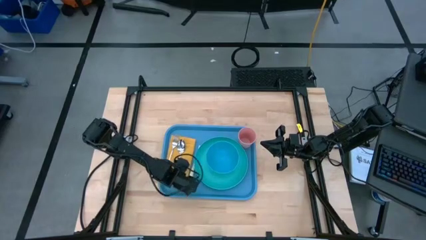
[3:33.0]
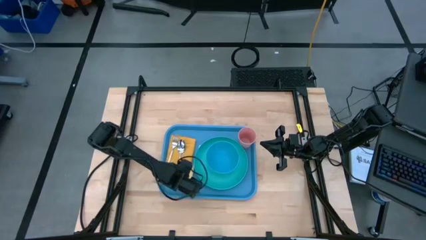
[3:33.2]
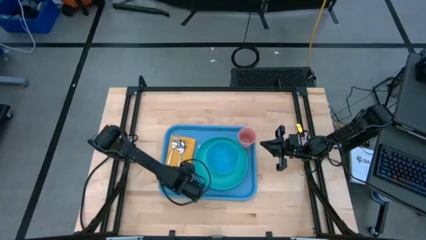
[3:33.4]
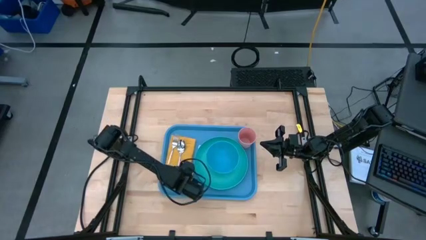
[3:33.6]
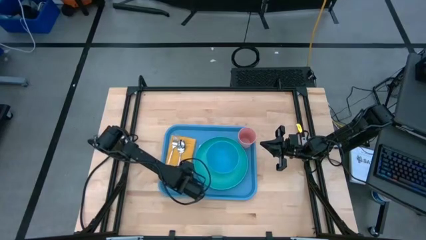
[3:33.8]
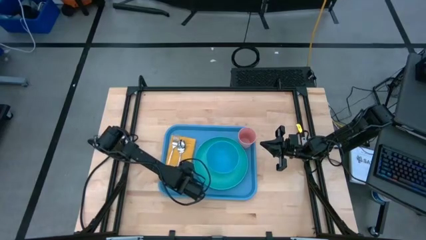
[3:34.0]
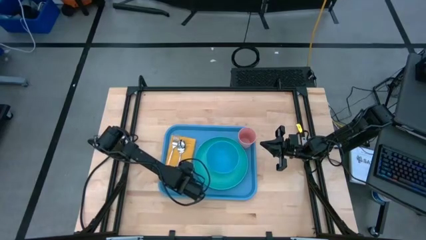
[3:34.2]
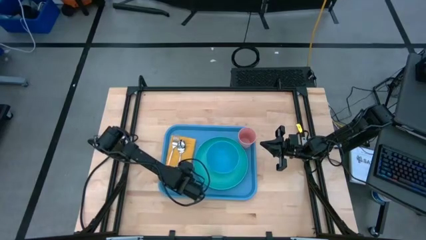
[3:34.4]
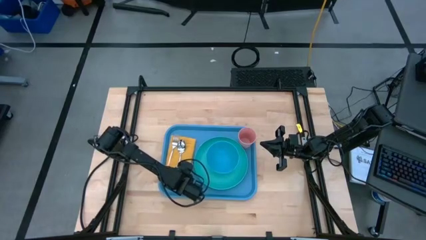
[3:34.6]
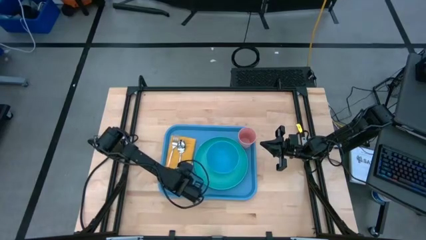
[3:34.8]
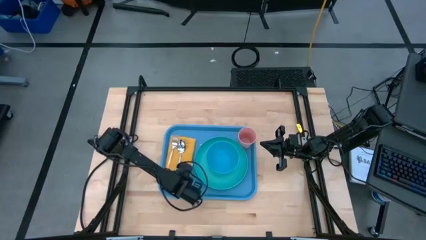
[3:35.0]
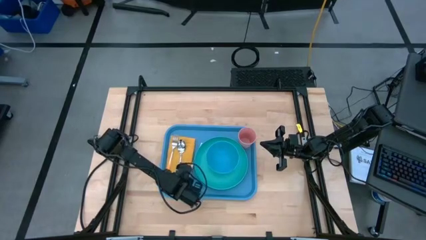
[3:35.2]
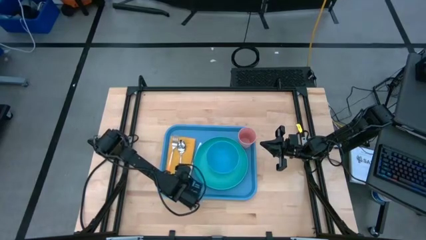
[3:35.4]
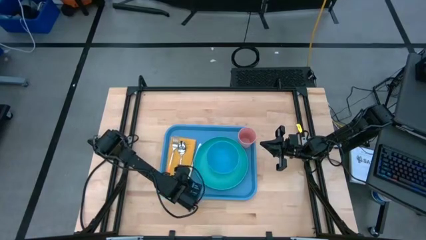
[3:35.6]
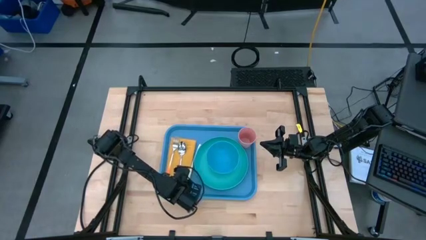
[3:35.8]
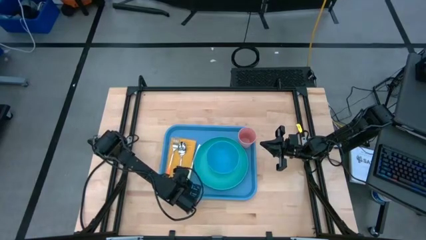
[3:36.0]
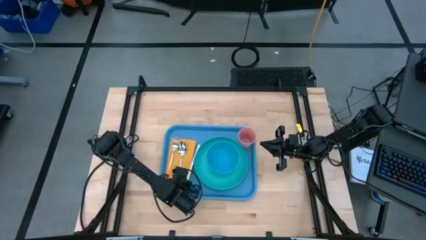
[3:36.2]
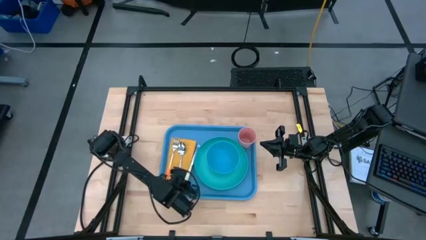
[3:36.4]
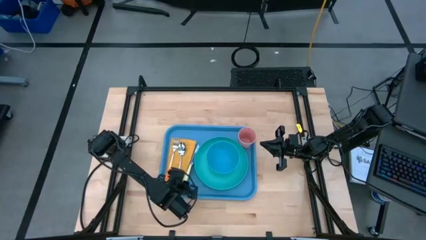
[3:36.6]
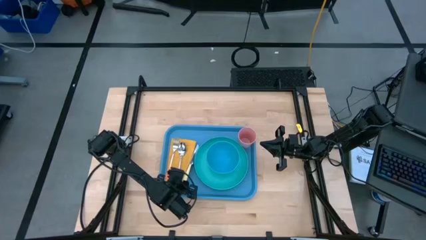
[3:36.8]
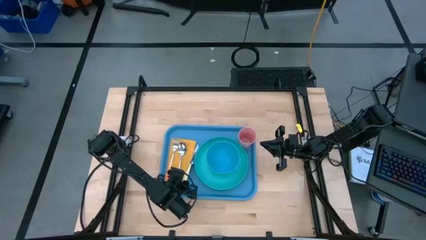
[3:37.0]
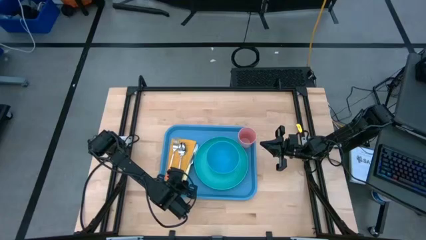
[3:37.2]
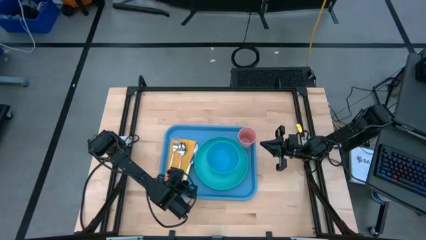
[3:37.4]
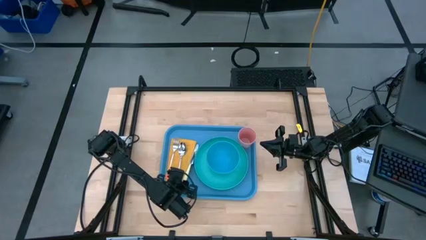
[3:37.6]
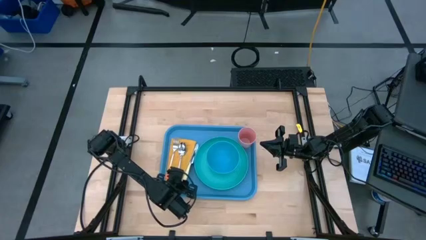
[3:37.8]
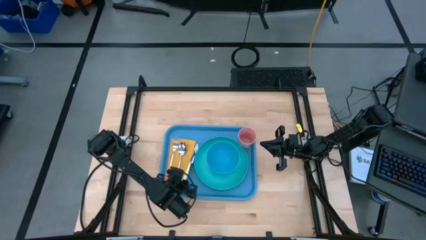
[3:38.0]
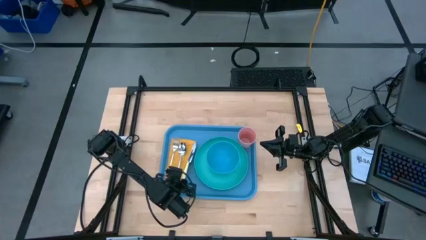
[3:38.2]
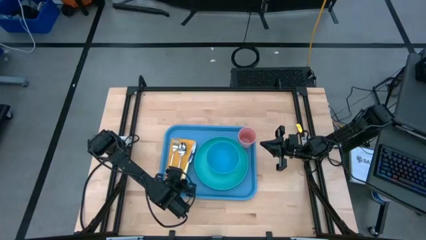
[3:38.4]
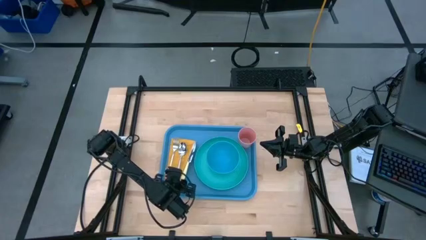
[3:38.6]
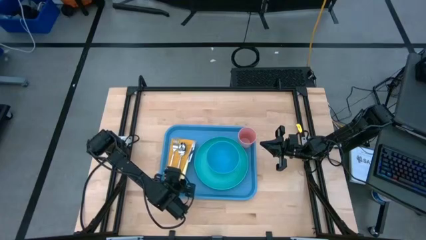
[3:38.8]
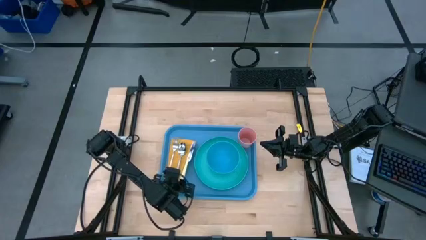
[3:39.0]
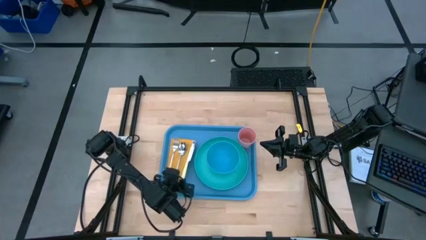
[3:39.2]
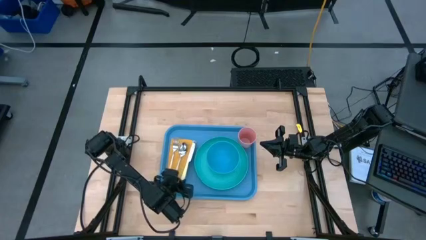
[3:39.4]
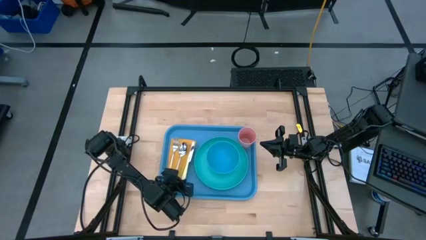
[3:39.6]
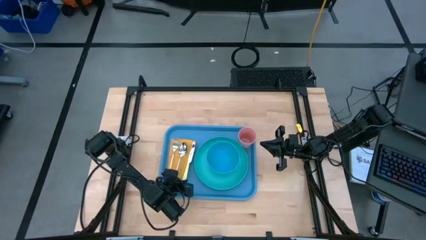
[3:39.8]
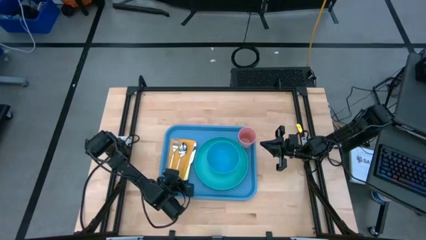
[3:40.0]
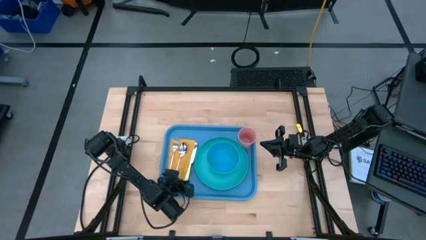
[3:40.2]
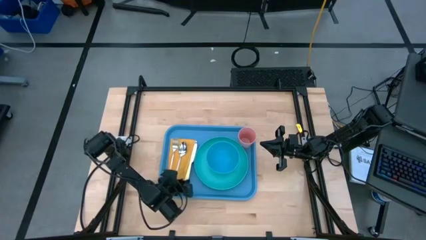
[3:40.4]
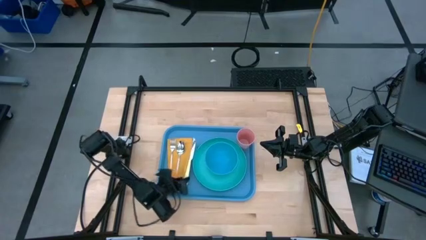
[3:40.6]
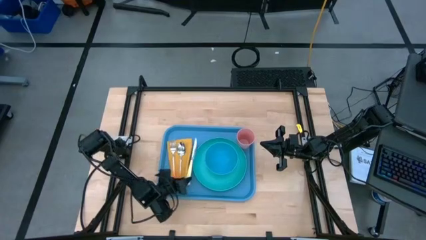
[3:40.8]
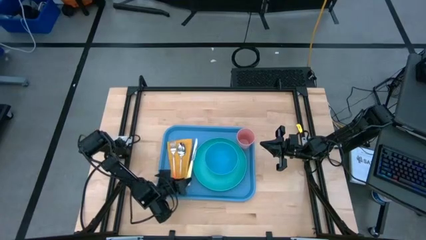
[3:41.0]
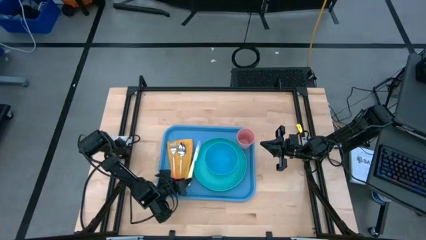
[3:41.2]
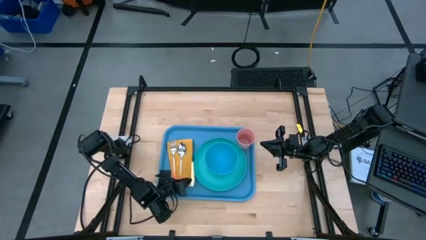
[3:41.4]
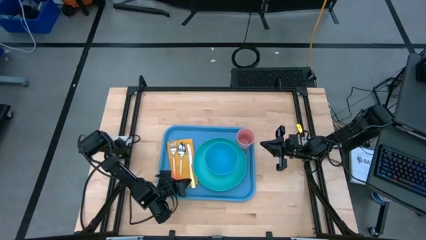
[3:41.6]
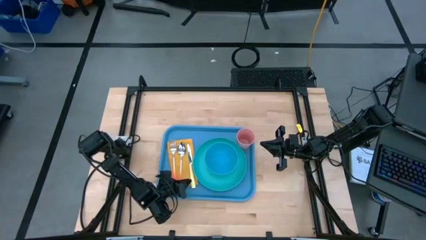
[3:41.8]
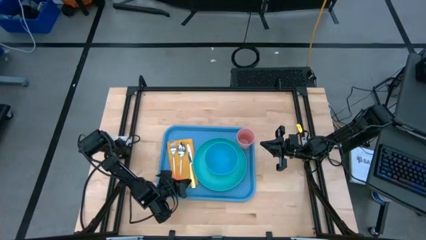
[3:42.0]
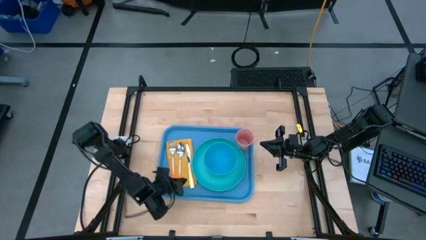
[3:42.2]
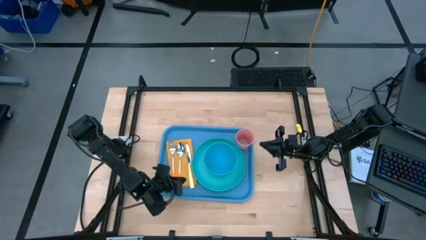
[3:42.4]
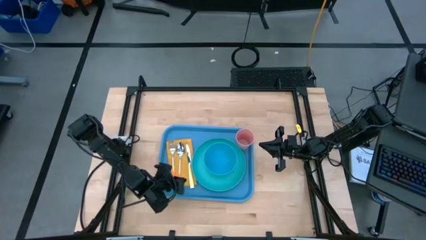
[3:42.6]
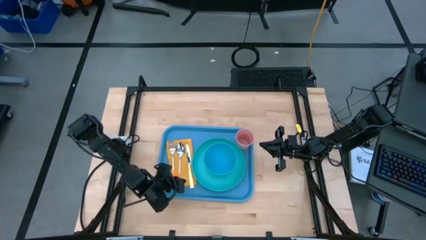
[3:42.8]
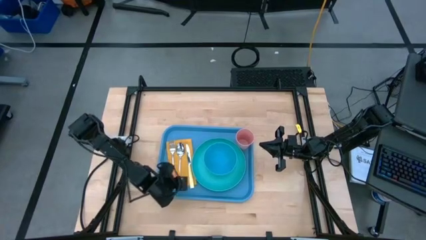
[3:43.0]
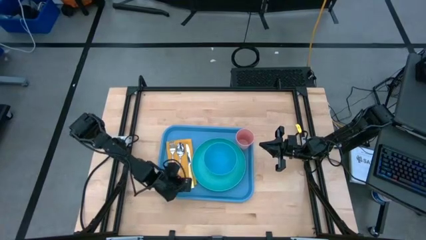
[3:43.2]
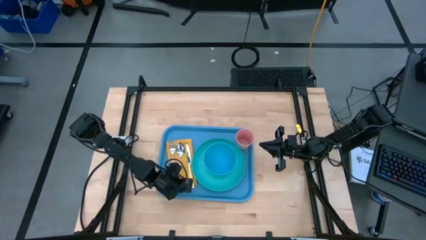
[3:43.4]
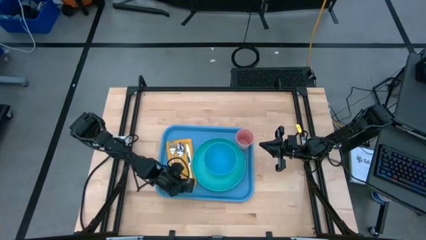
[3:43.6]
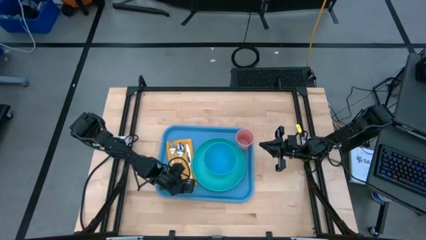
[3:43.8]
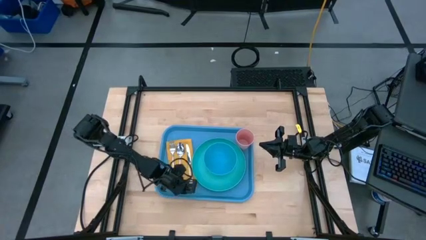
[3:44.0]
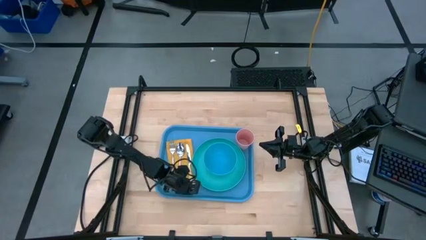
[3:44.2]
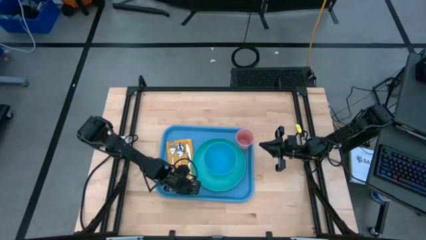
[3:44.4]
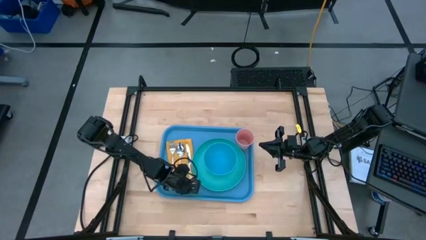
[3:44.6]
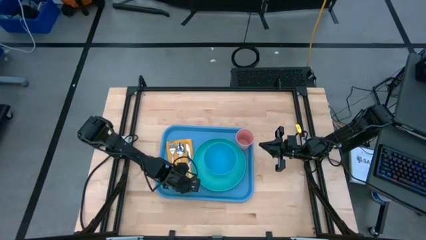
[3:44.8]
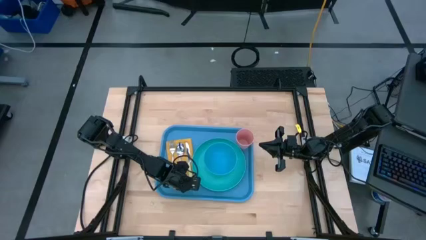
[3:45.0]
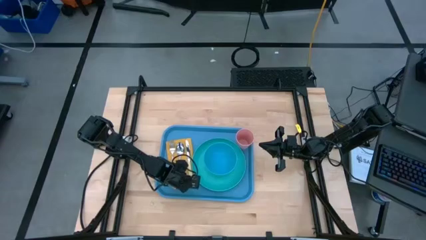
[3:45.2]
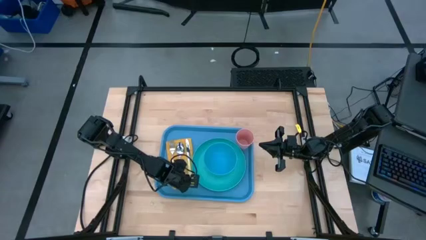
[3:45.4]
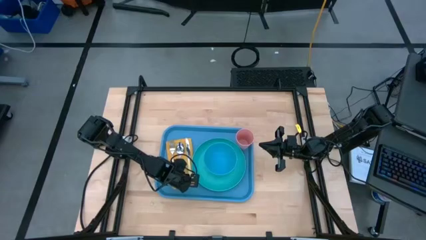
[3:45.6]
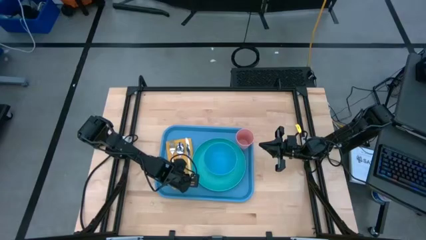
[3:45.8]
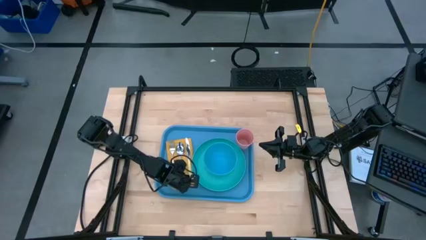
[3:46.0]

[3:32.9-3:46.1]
Task: Set up tray
Adjust the yellow knife on the yellow napkin on the blue serving tray
